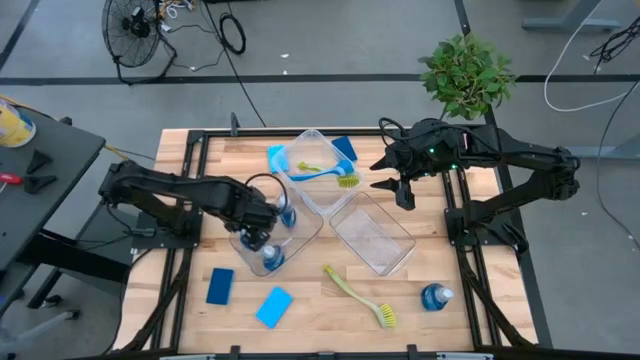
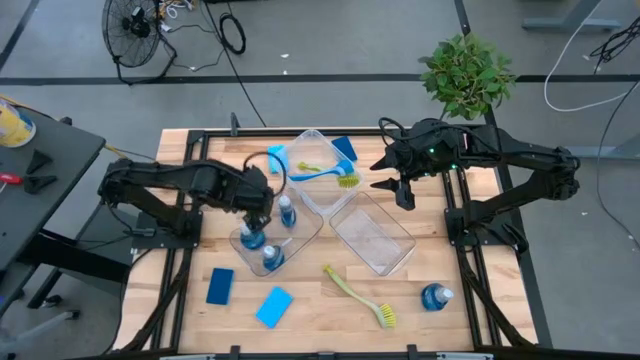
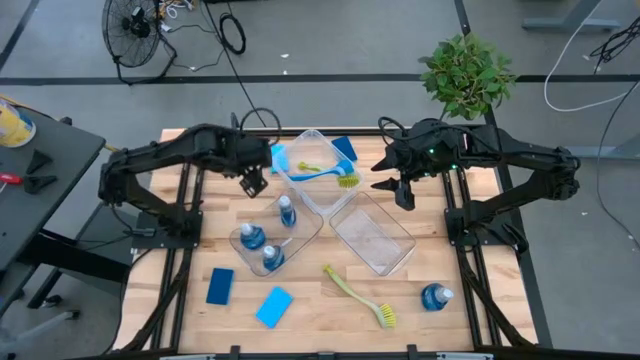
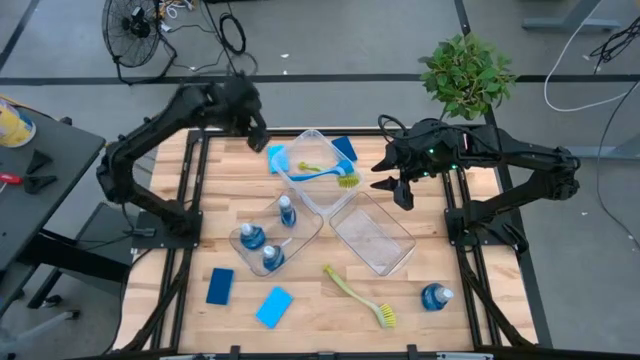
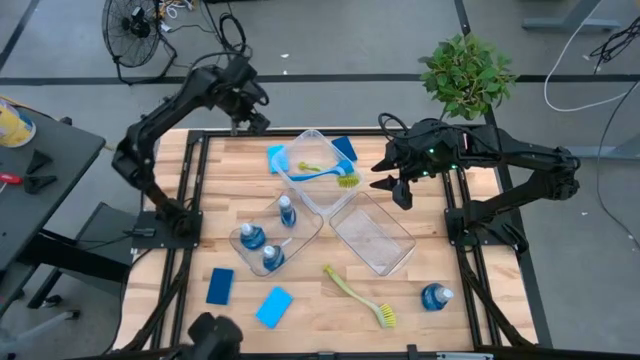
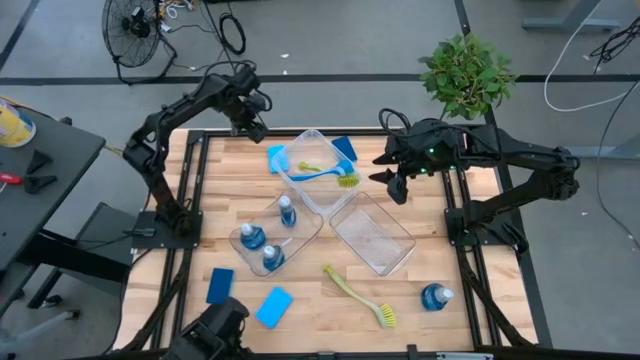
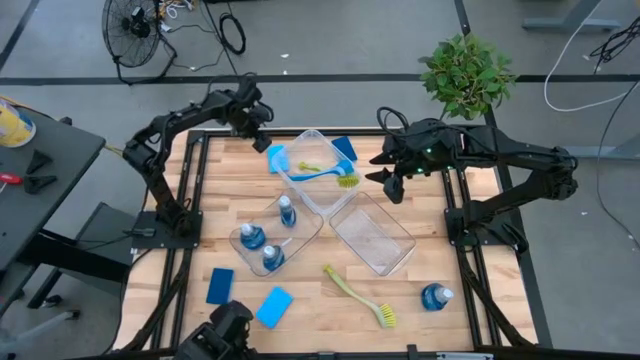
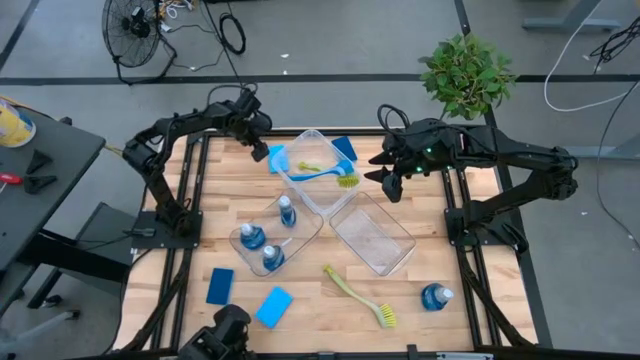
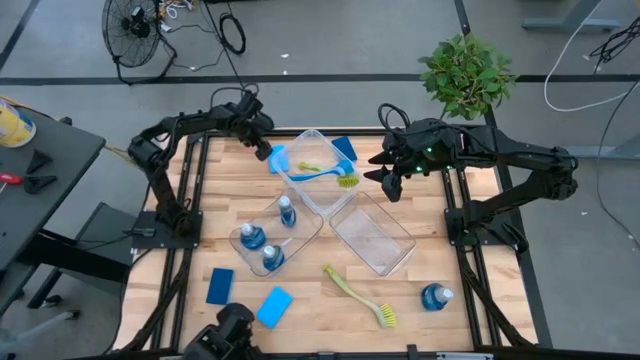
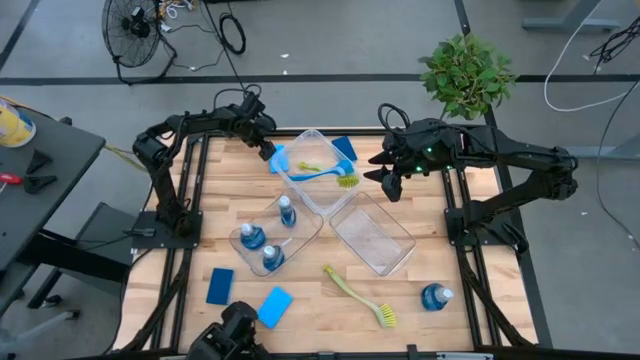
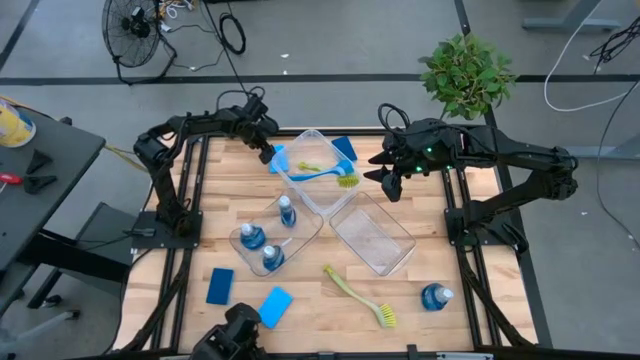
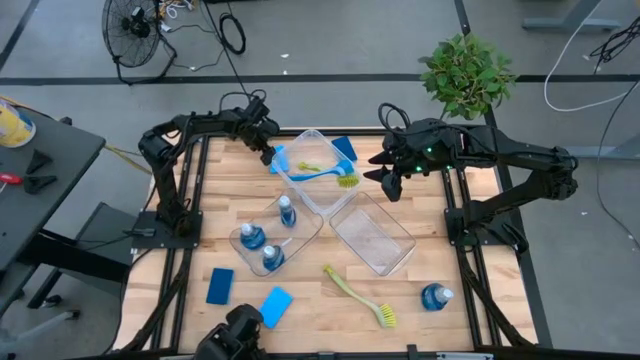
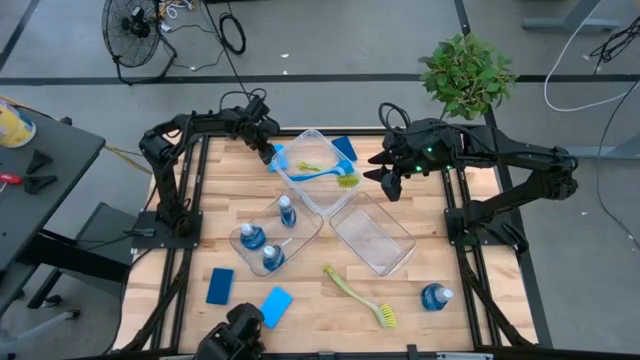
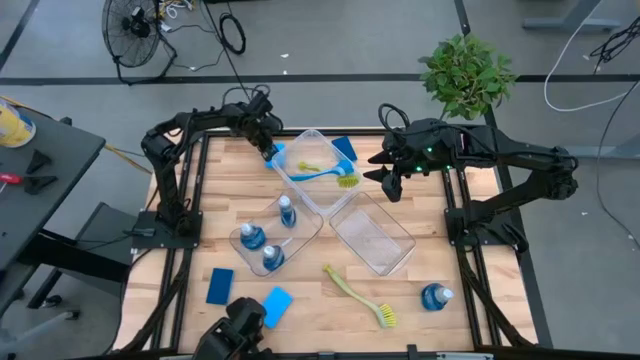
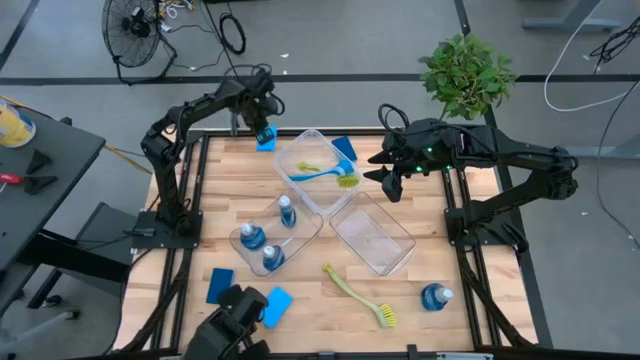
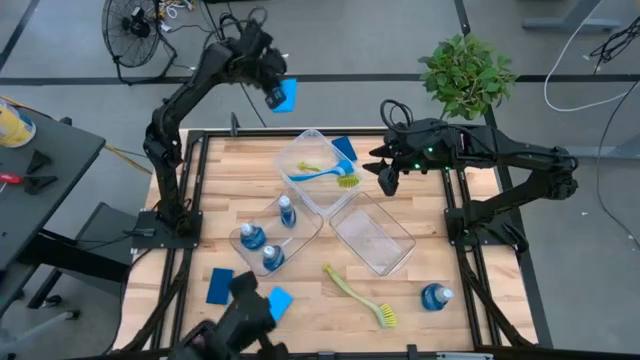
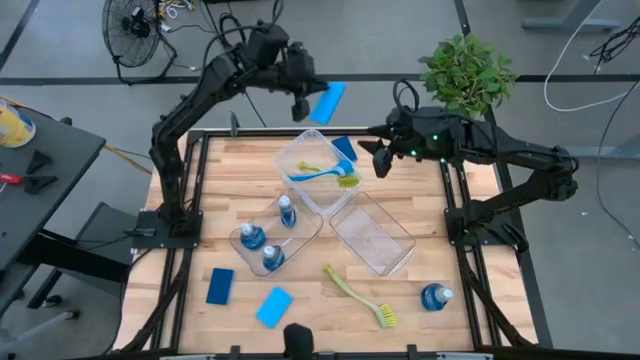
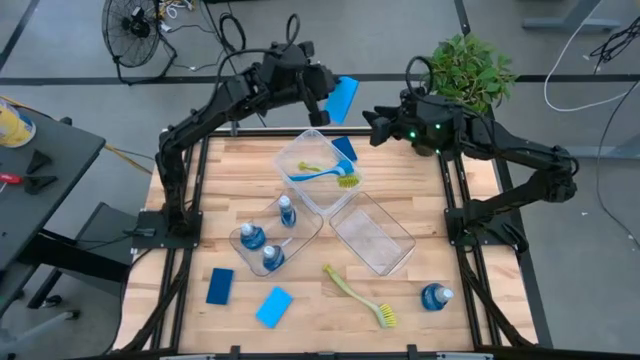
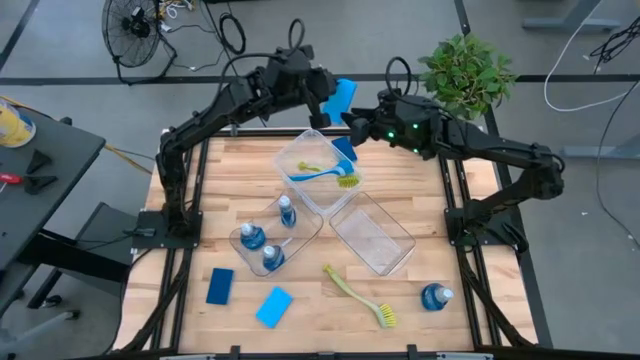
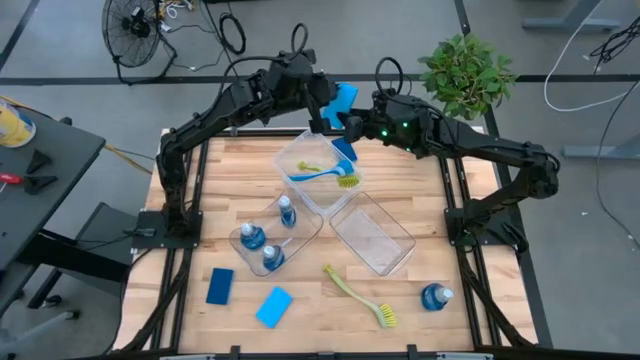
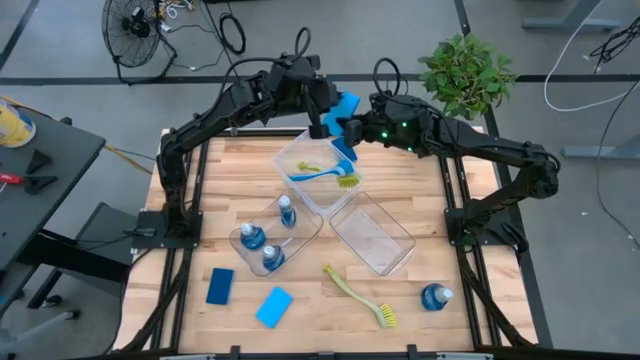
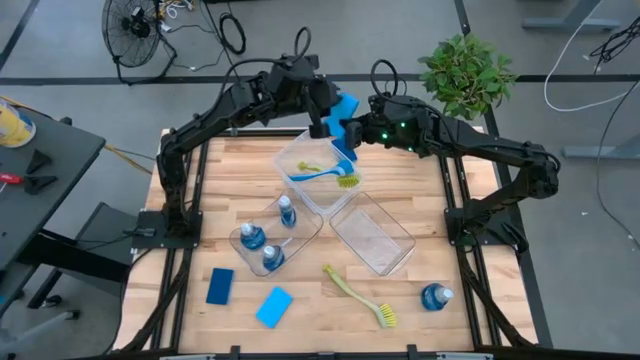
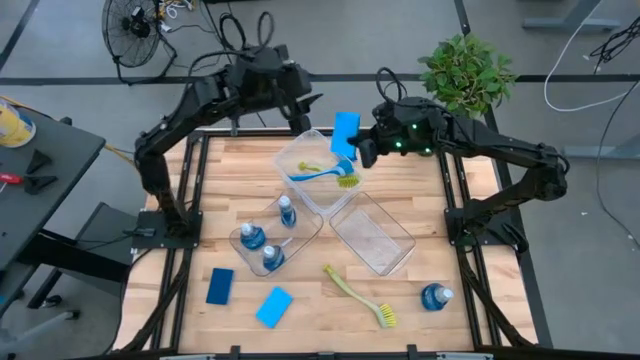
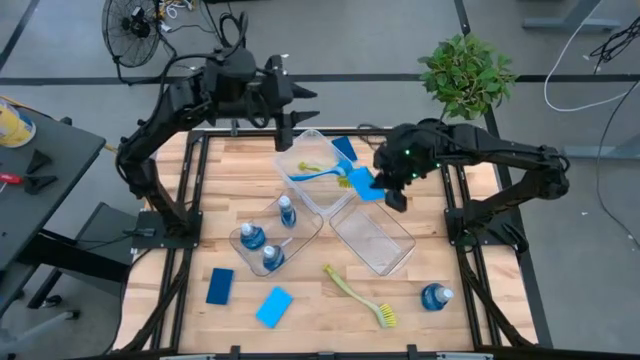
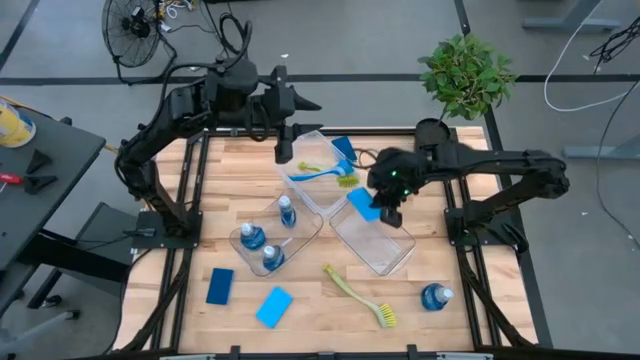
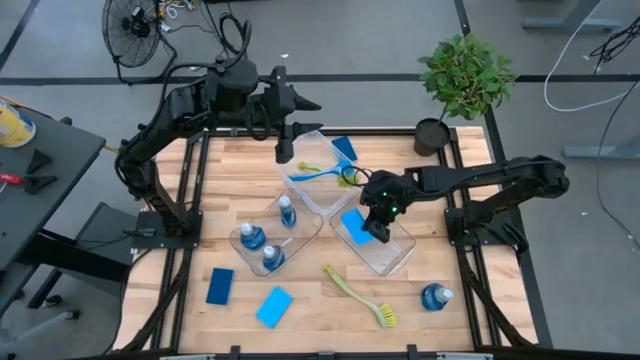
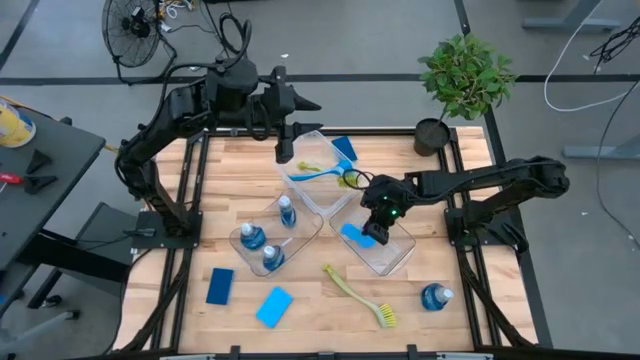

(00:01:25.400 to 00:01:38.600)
Task: Pick & Place Kitchen Sink Supplies
Put the blue sponge into the right transparent bin

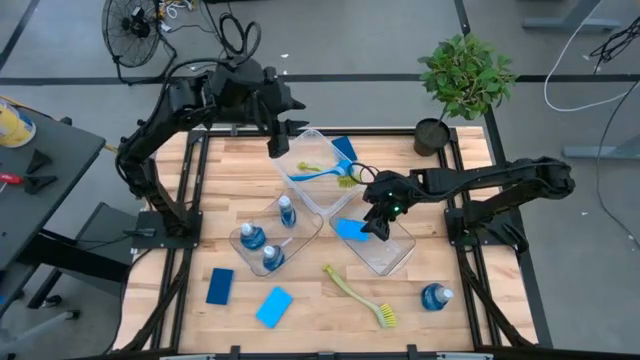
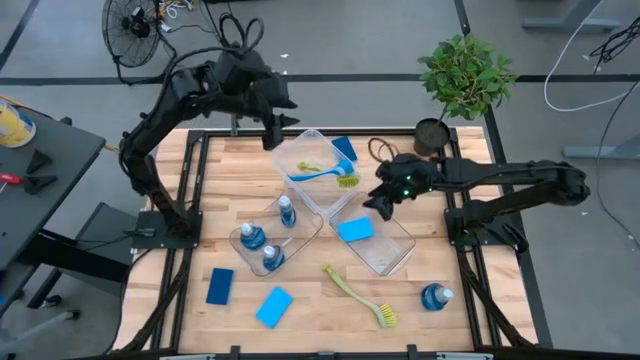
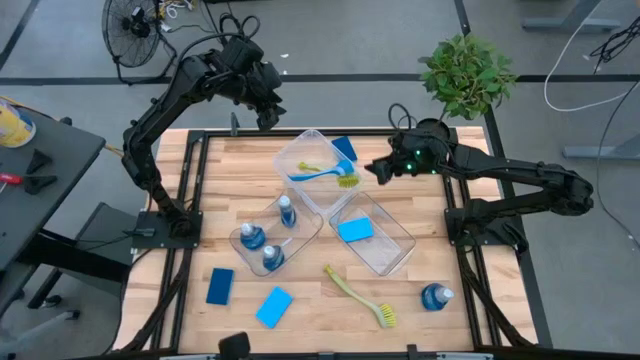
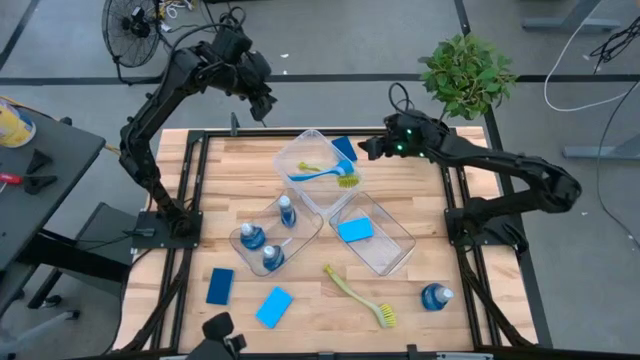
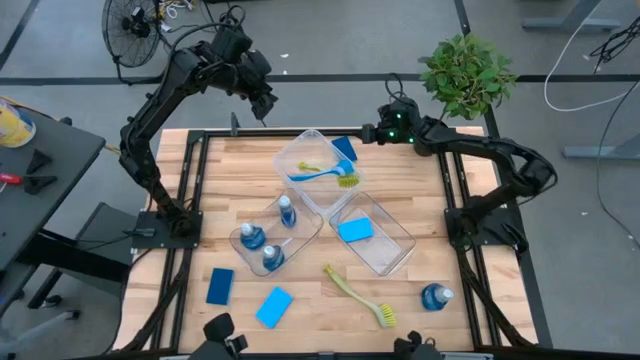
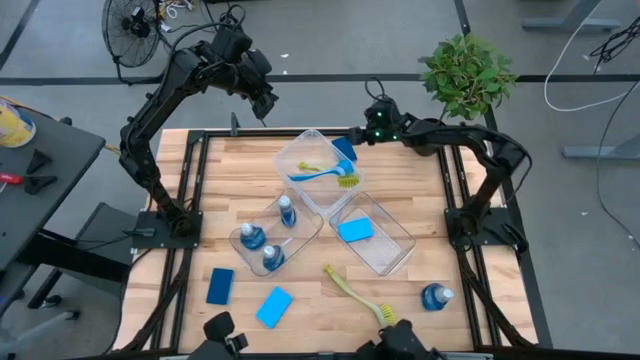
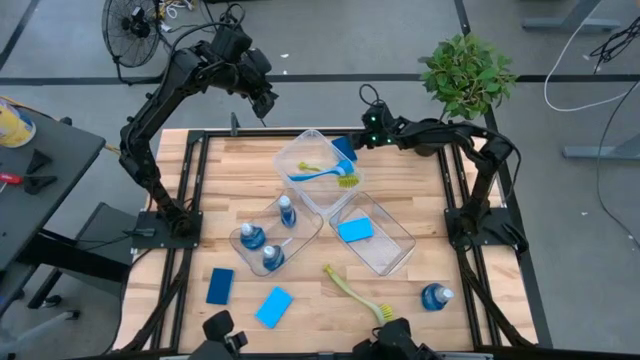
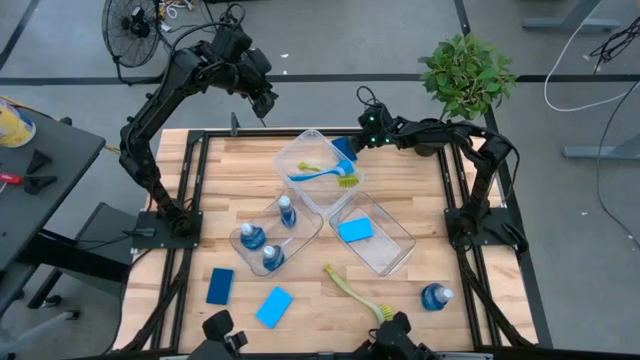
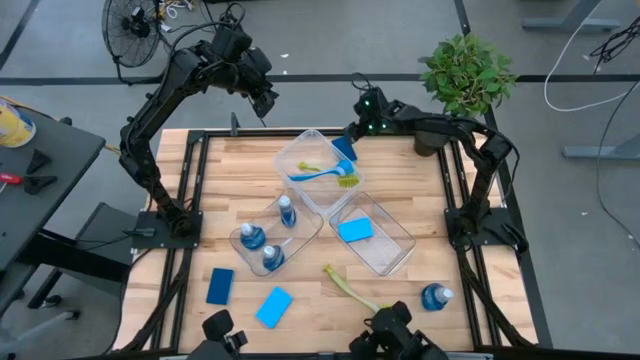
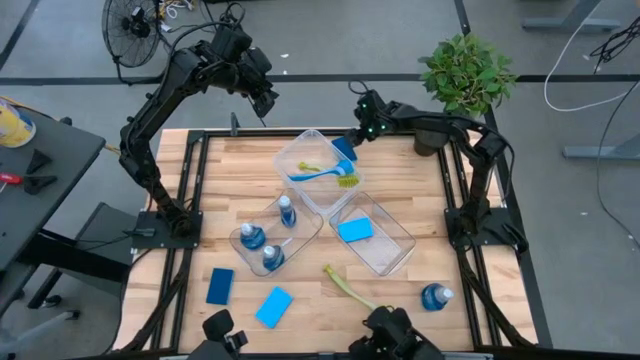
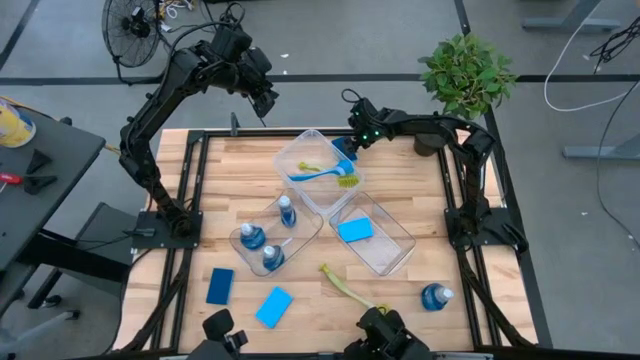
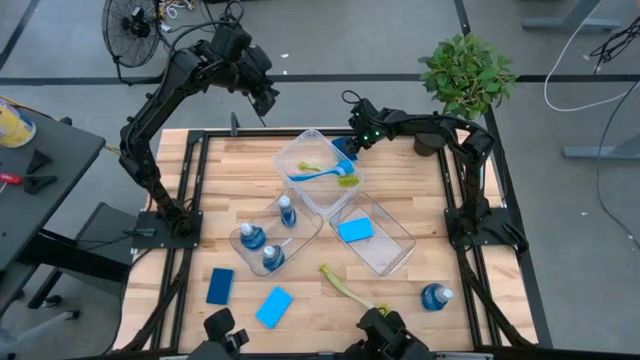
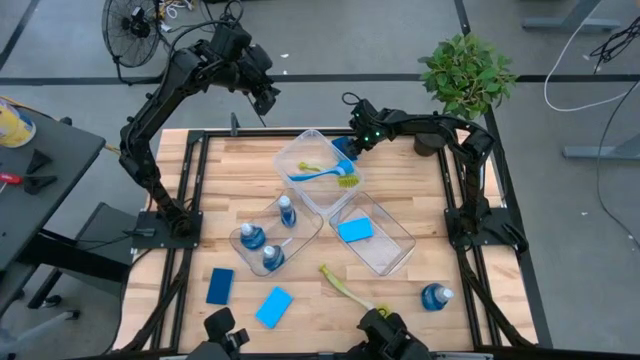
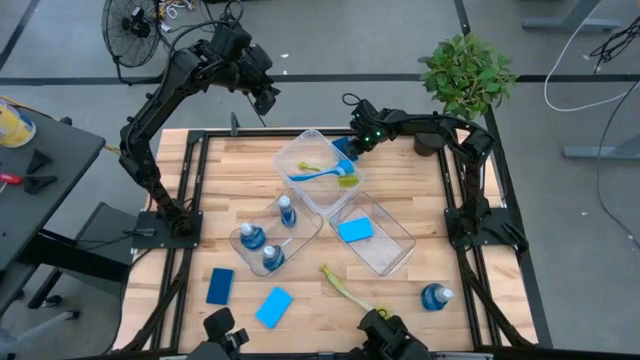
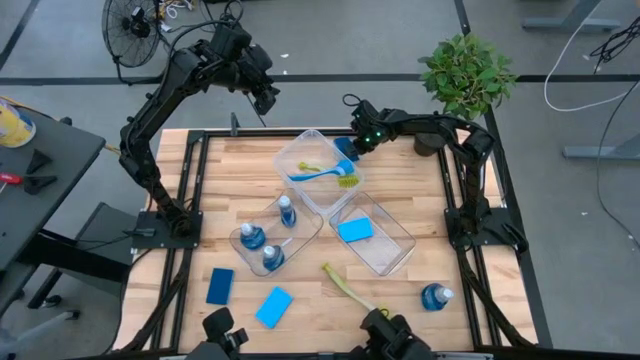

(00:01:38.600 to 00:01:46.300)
Put the blue sponge into the right transparent bin

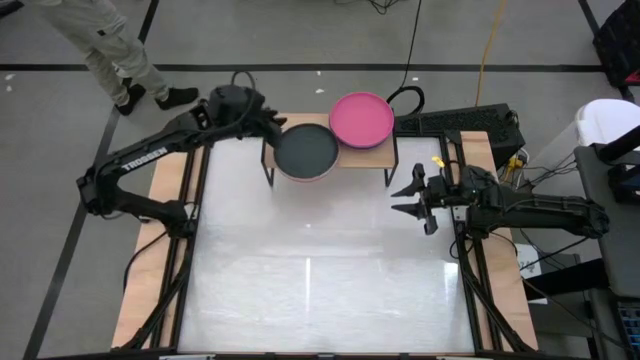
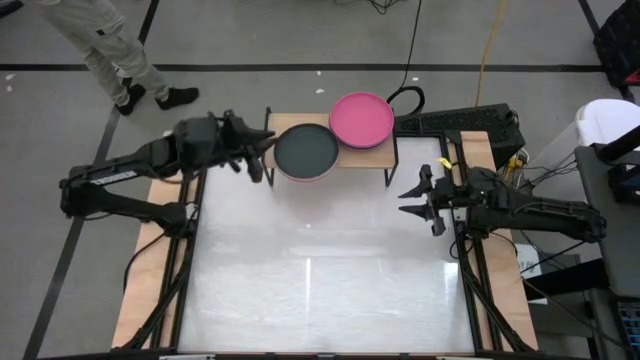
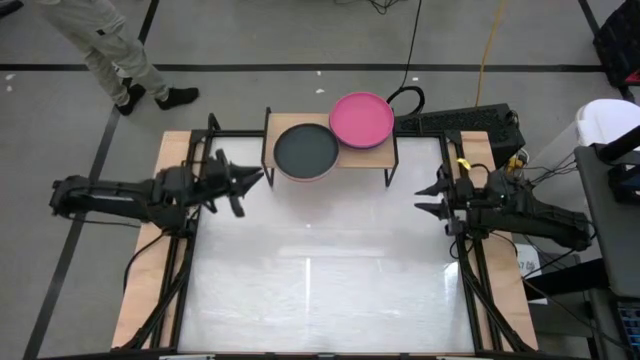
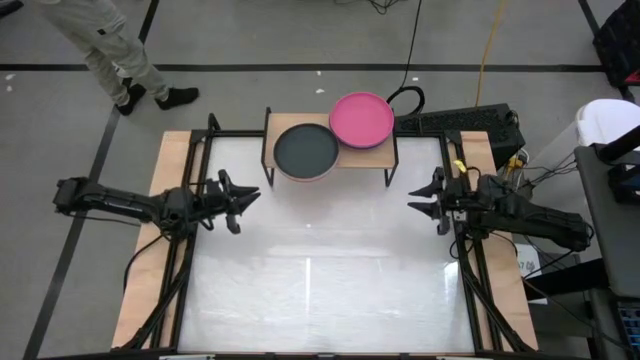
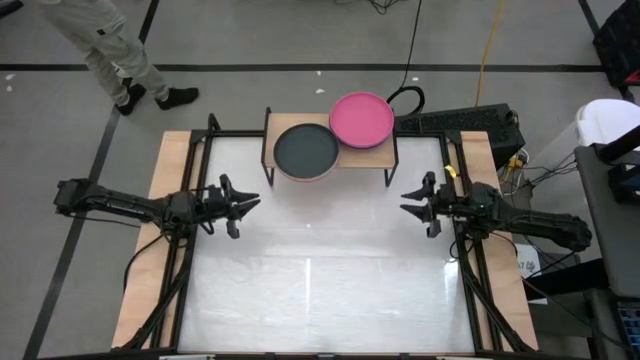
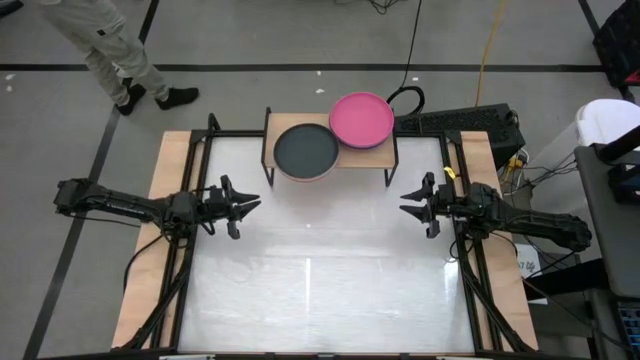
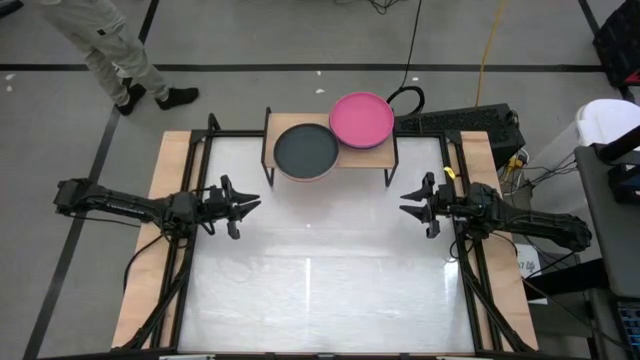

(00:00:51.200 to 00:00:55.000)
Task: Place and stack plates onto a shelf
Return to Home Position
